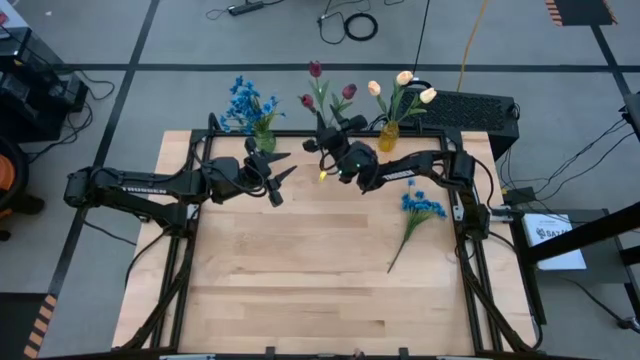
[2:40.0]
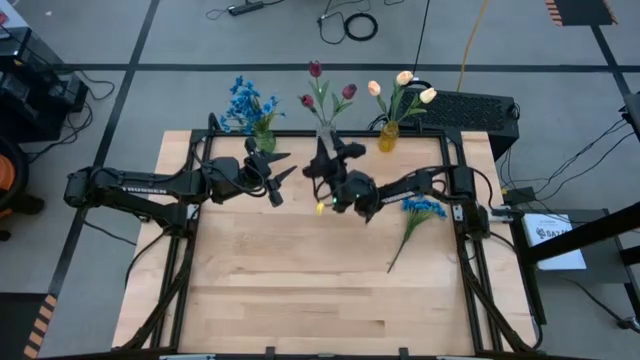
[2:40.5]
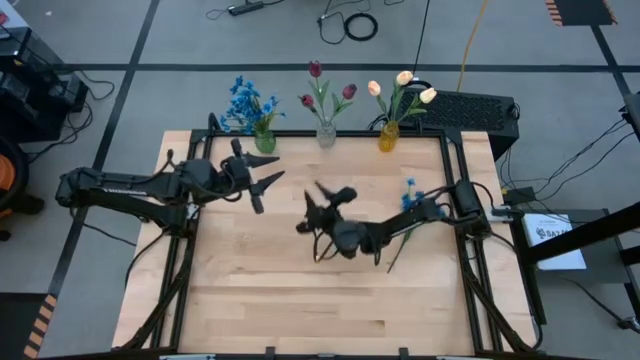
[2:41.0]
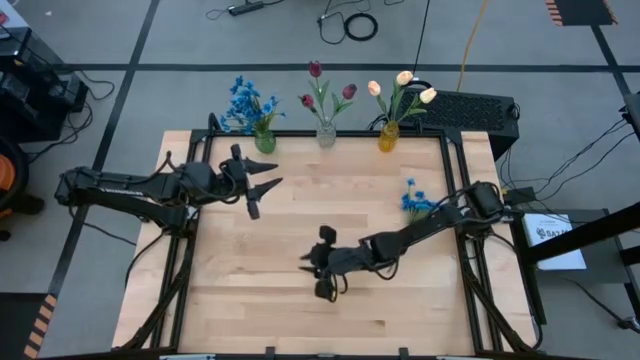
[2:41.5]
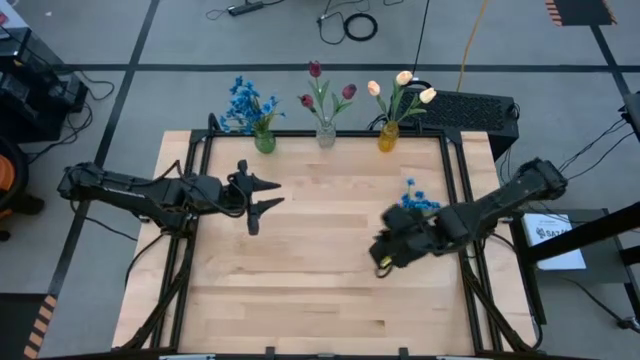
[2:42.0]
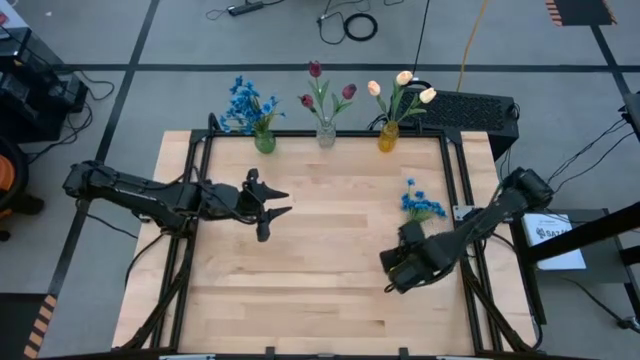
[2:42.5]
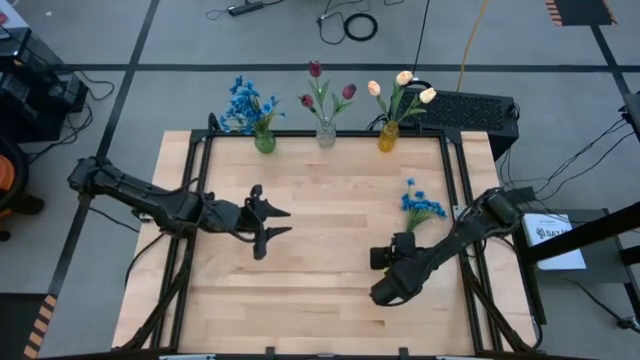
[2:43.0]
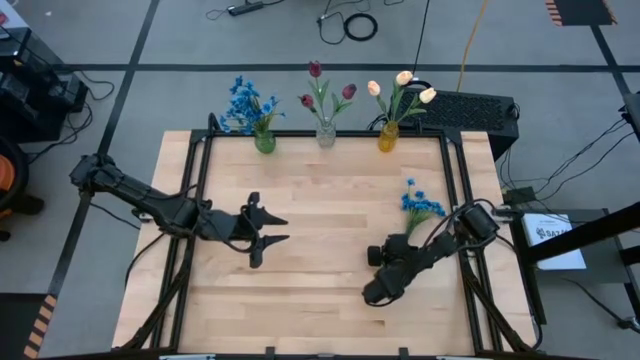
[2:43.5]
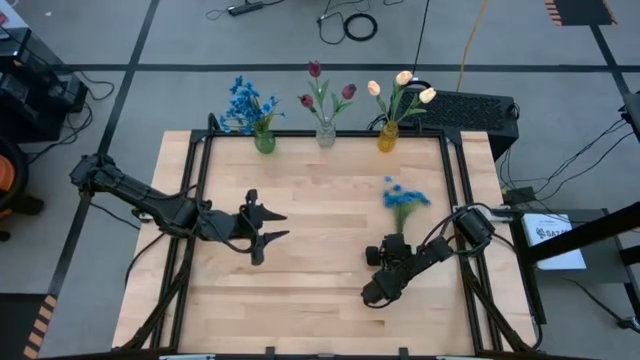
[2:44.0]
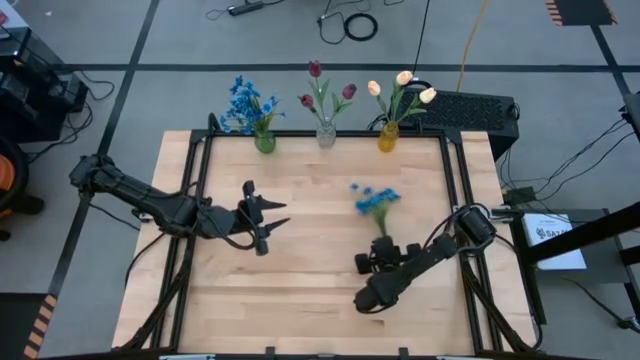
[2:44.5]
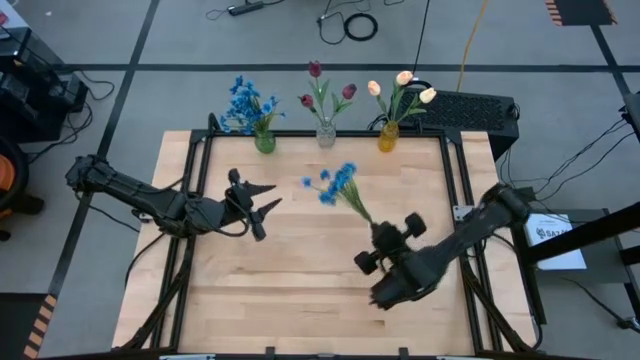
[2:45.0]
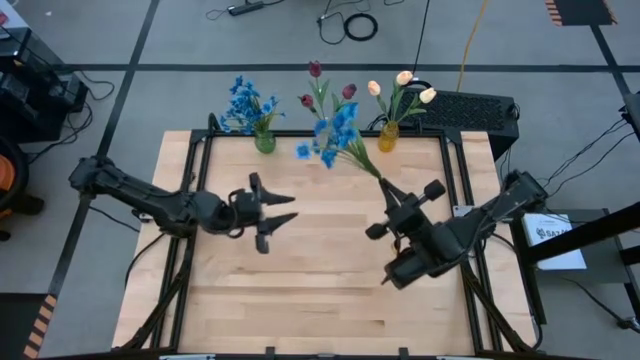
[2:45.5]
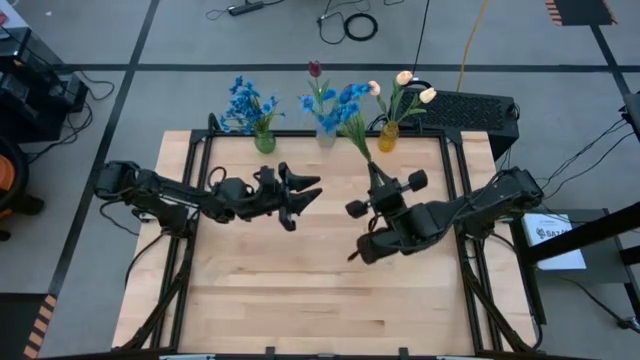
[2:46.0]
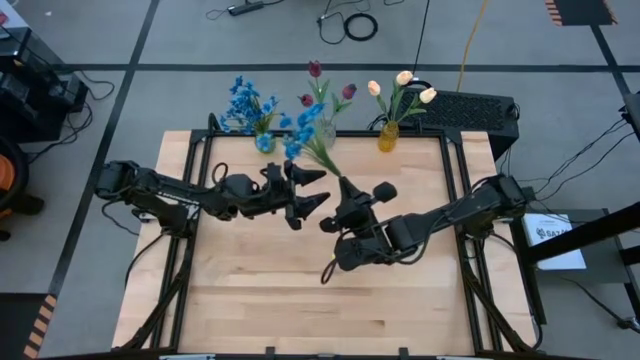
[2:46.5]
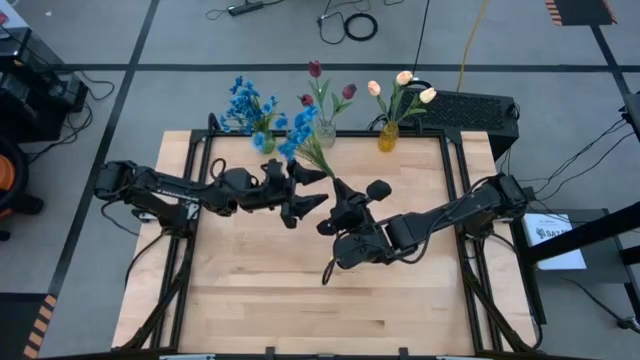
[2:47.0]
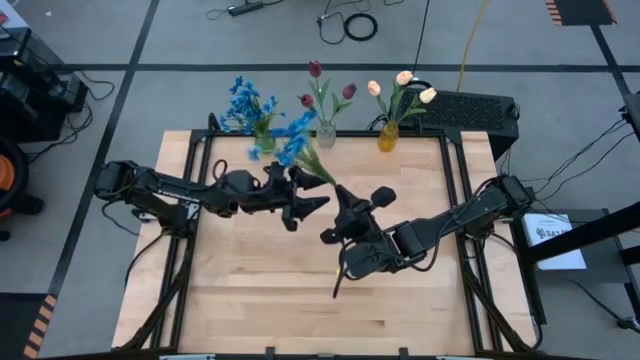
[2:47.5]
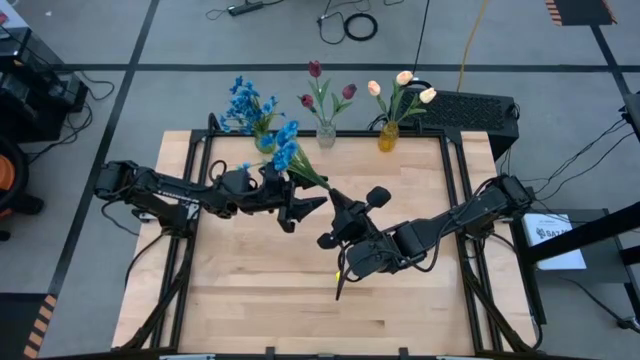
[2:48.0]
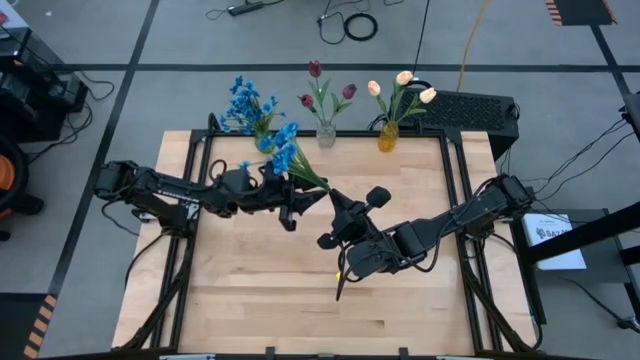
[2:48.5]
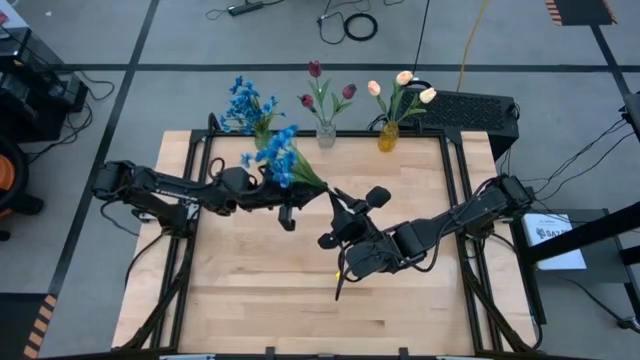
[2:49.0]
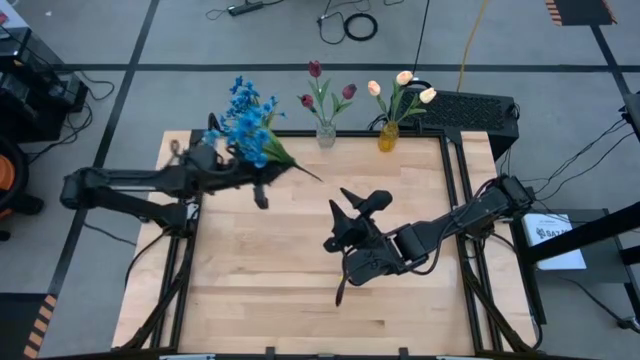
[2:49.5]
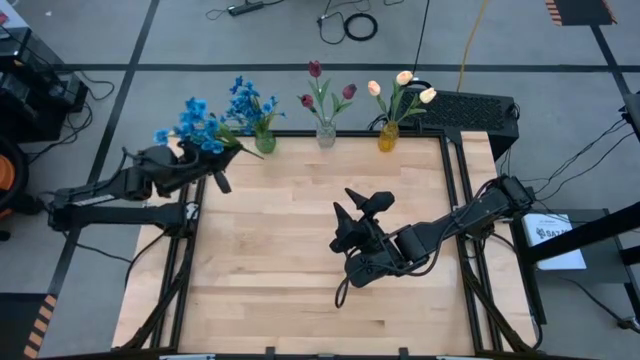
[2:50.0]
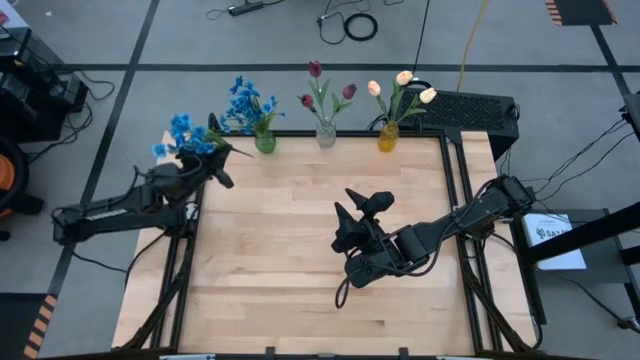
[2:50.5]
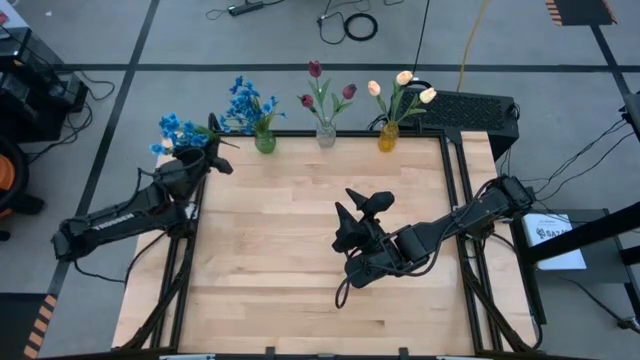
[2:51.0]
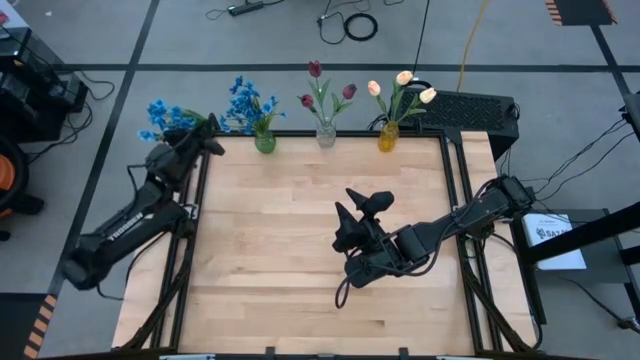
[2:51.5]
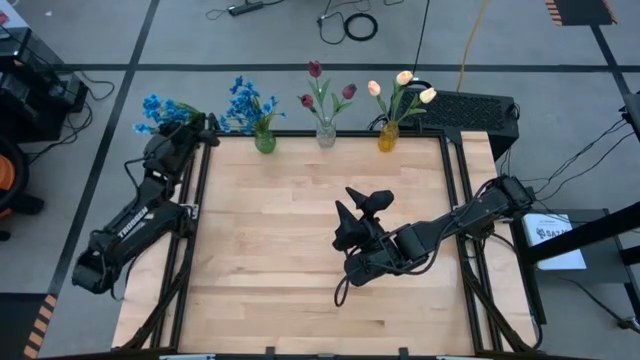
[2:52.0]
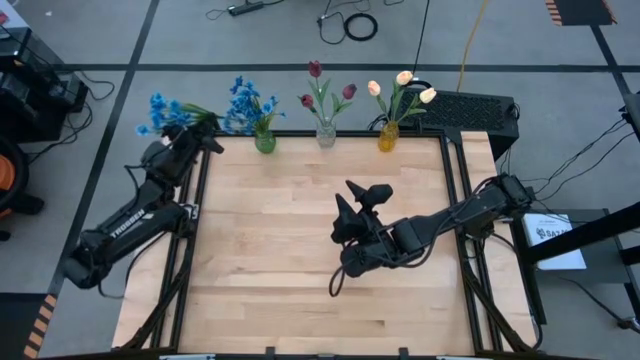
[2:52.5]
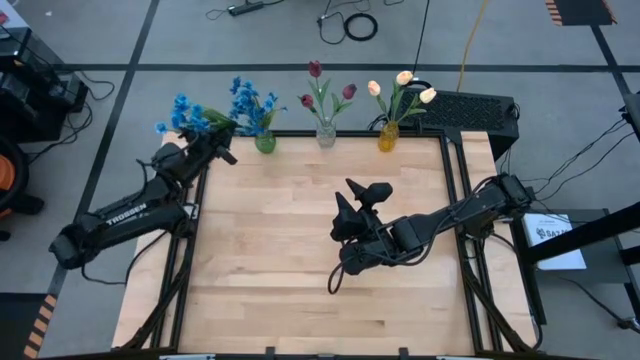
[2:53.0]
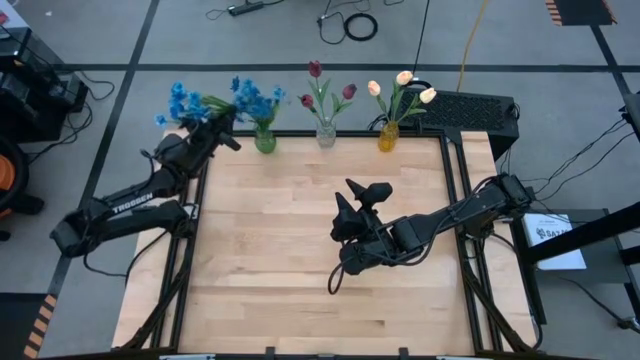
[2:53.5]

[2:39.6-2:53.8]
Task: Sort flowers into vase by color
Put the blue flowers into the green flower vase

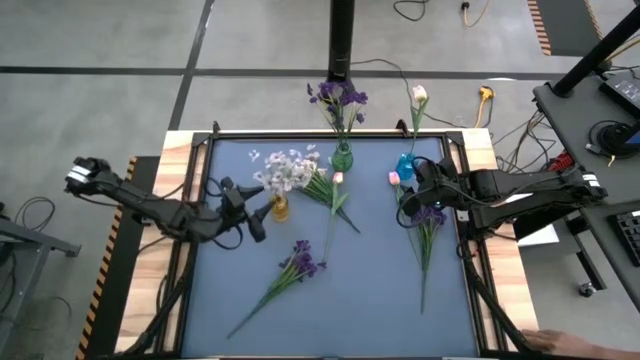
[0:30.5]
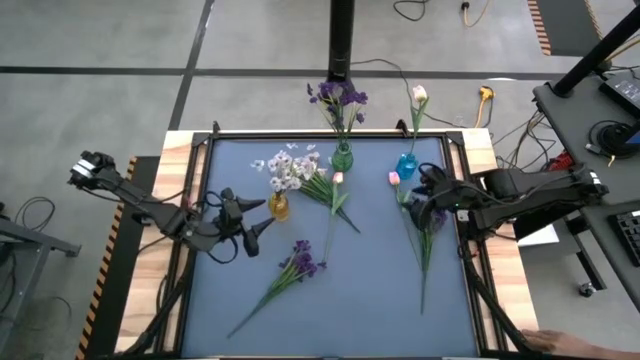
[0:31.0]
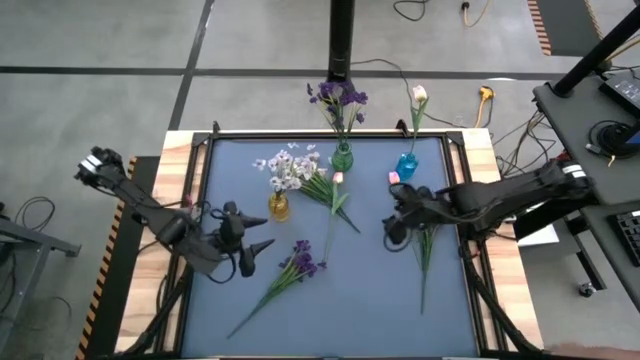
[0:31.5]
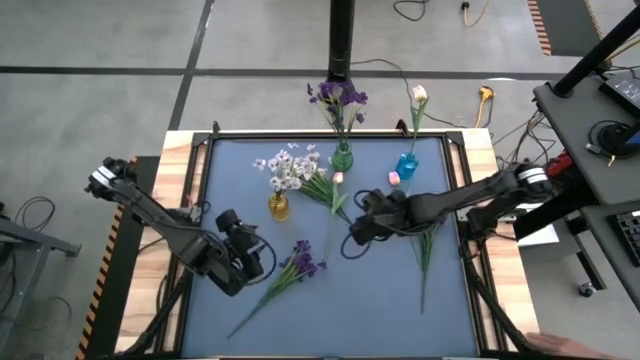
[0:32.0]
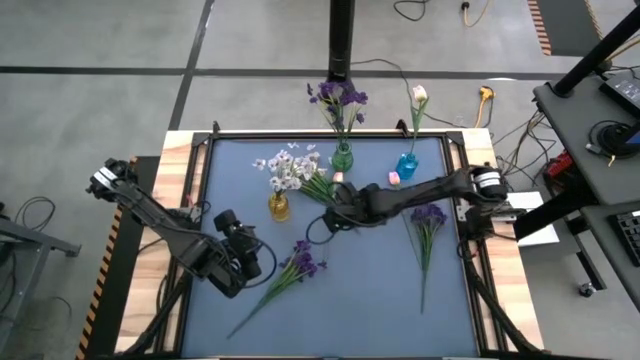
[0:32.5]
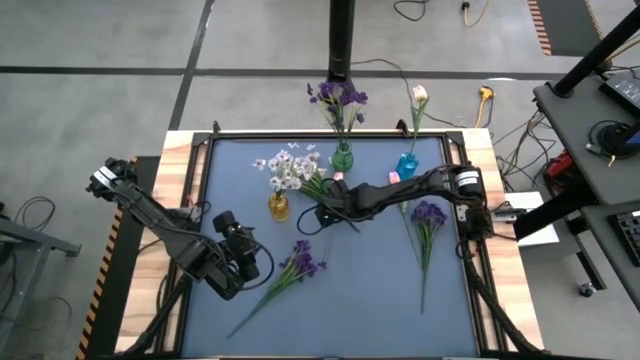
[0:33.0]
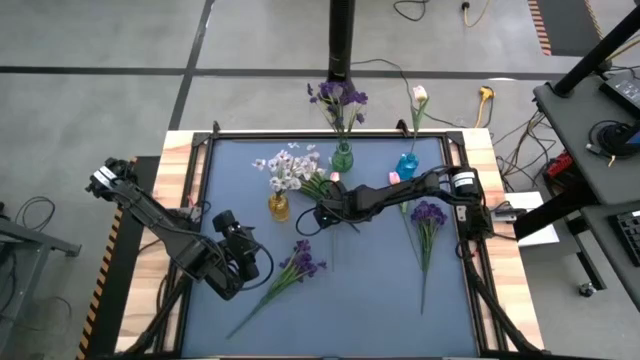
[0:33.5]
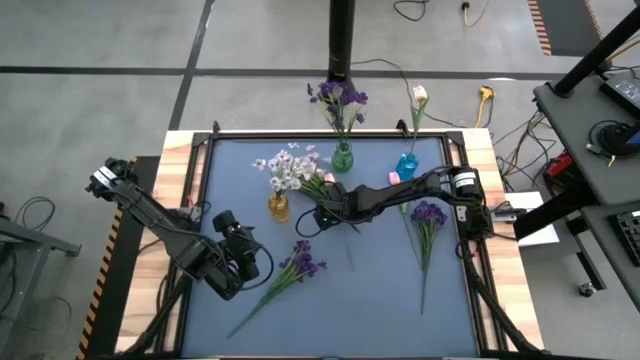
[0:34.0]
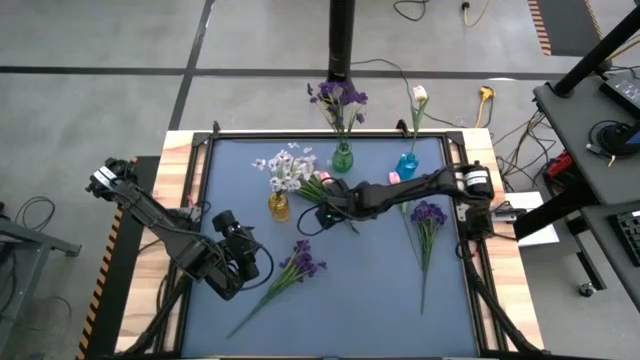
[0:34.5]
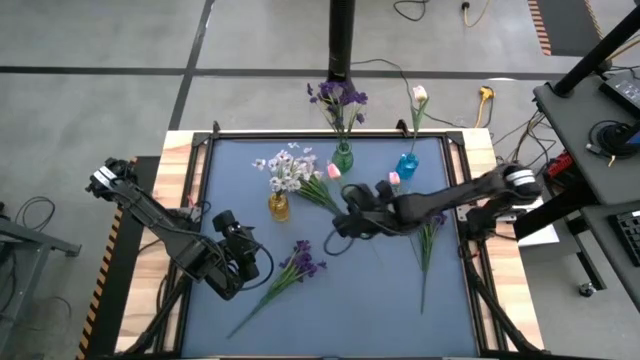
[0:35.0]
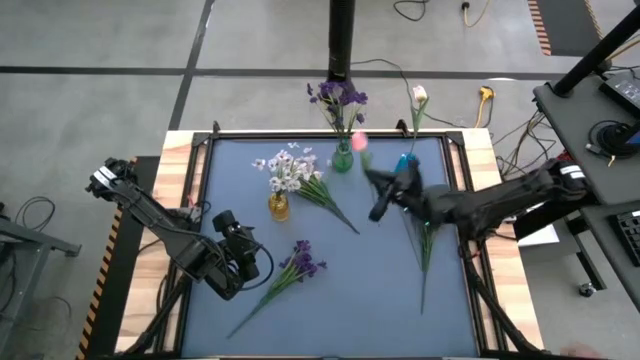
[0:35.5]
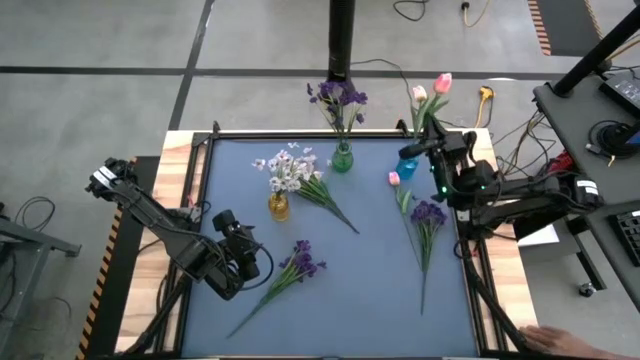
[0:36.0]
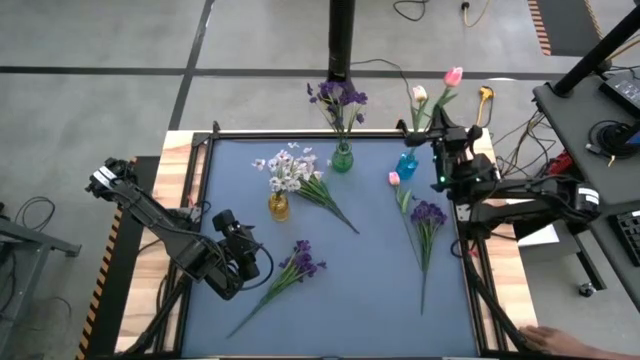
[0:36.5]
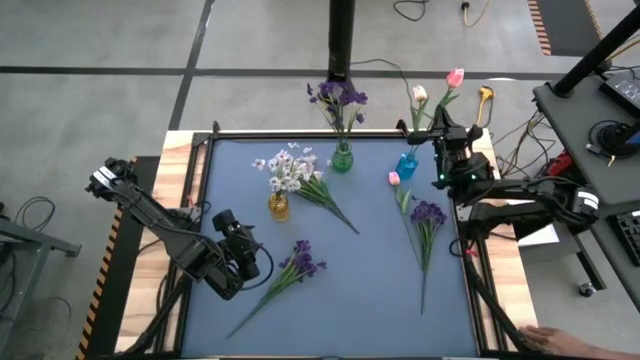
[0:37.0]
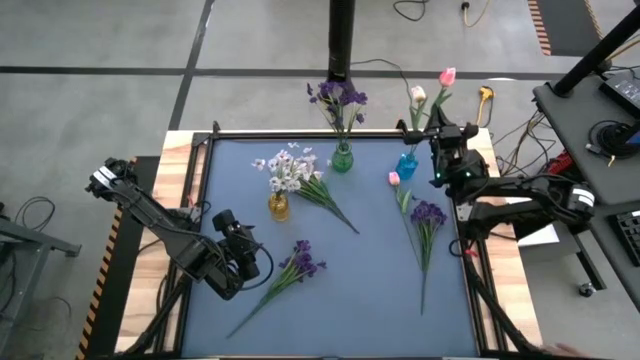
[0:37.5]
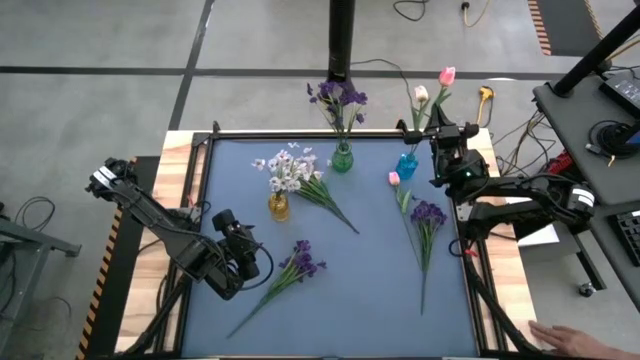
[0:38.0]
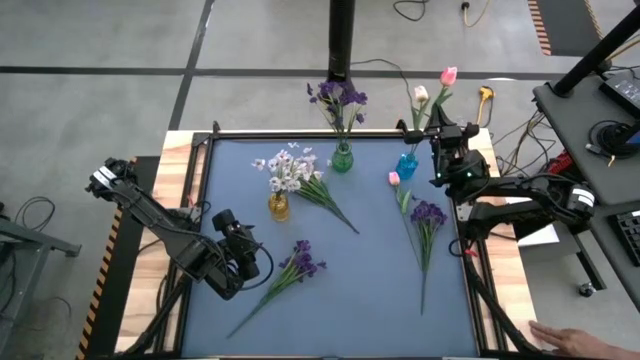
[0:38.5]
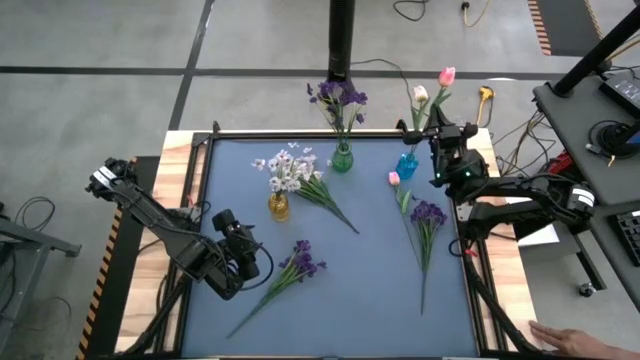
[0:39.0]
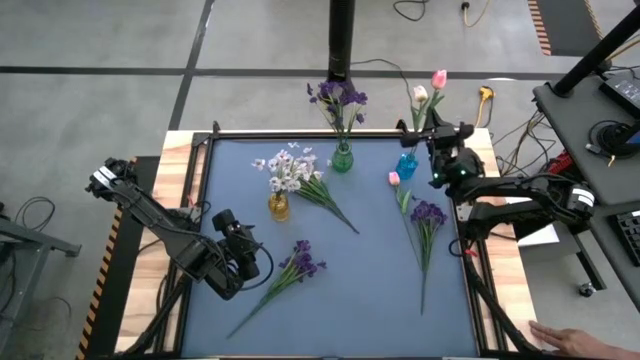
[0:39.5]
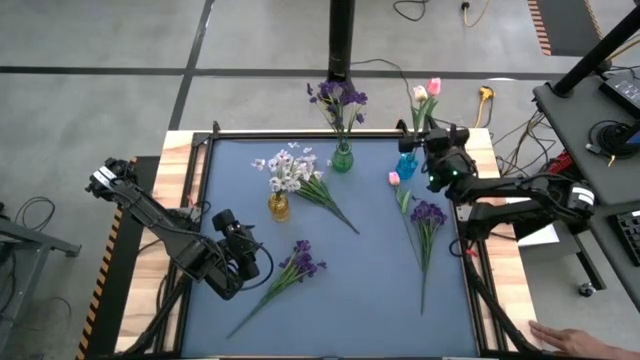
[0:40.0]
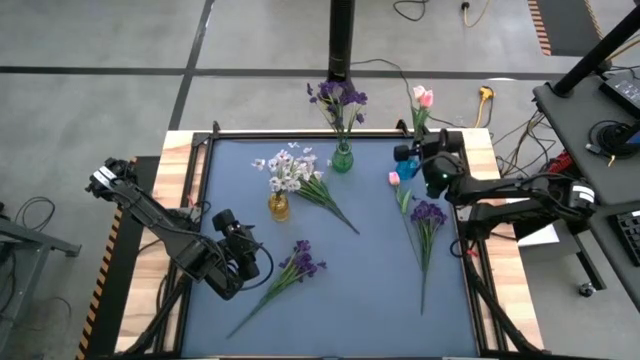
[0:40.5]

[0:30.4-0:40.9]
Task: Sort flowers into vase by color
Put the left pink flower into the blue vase
